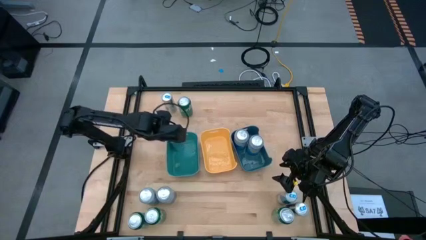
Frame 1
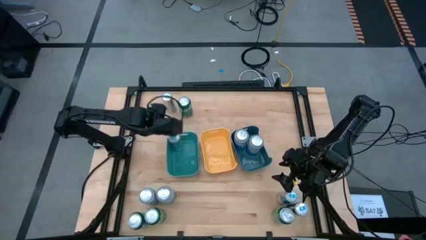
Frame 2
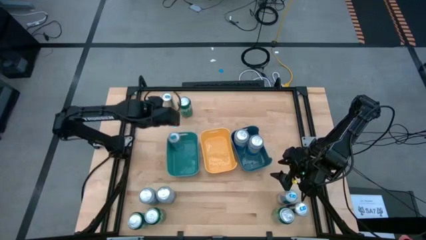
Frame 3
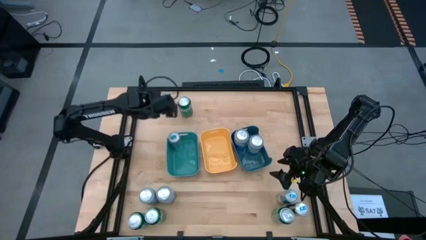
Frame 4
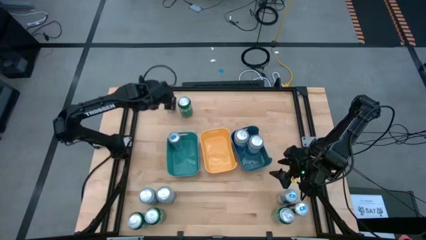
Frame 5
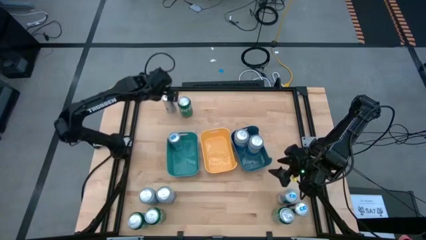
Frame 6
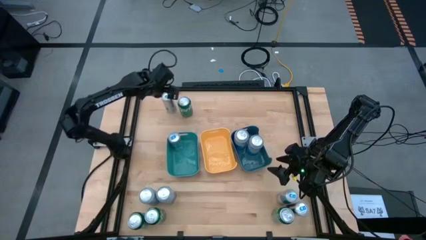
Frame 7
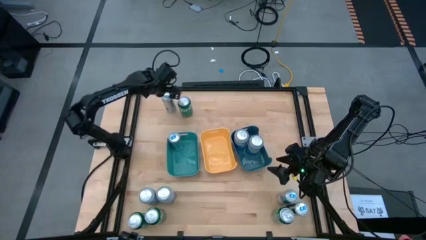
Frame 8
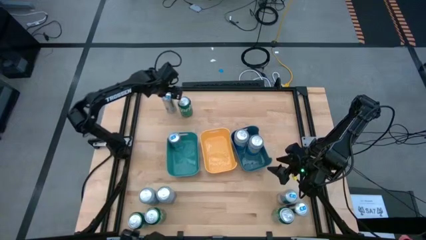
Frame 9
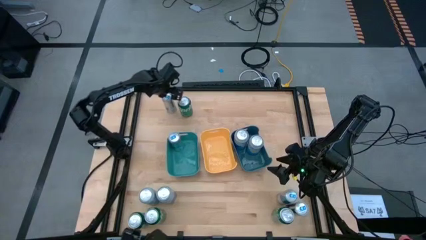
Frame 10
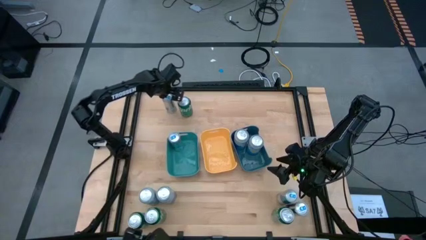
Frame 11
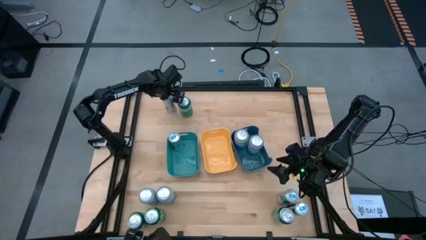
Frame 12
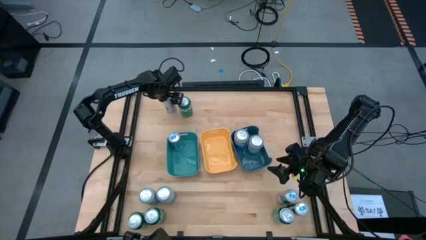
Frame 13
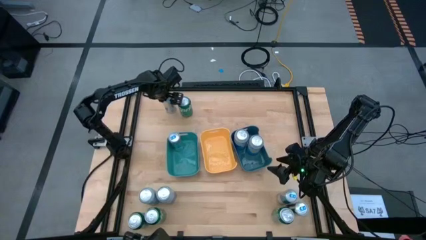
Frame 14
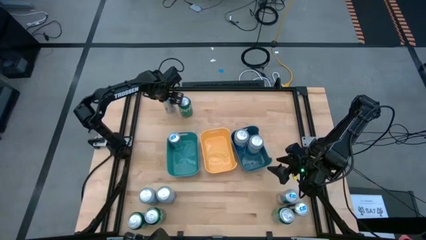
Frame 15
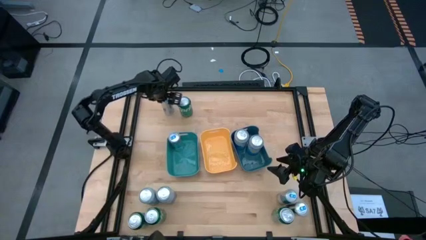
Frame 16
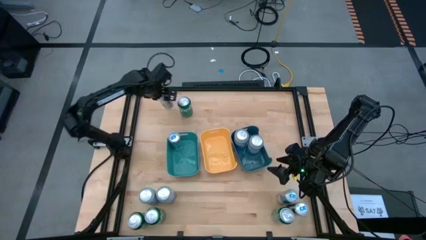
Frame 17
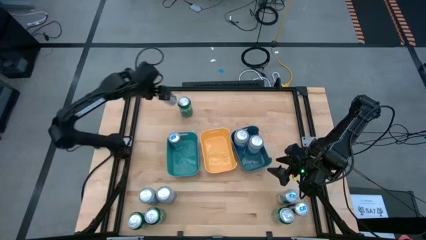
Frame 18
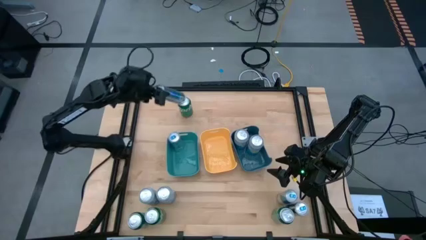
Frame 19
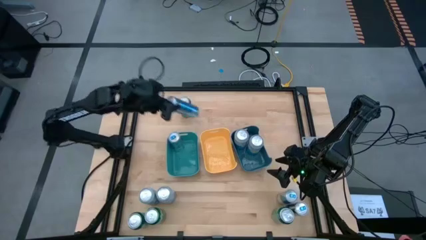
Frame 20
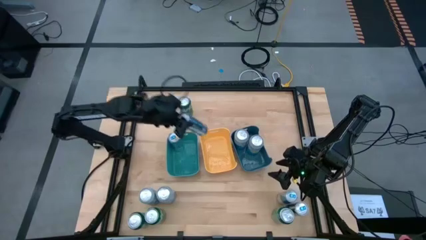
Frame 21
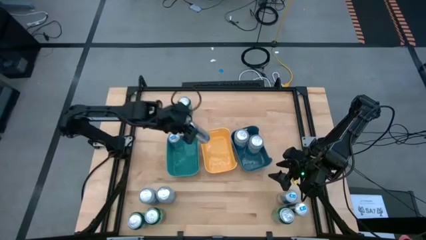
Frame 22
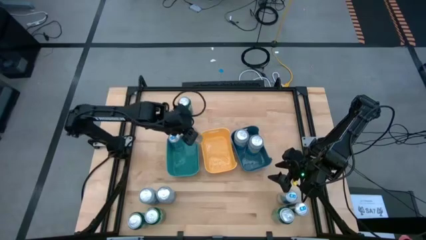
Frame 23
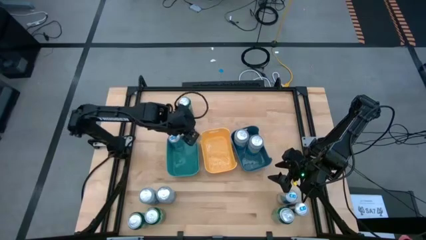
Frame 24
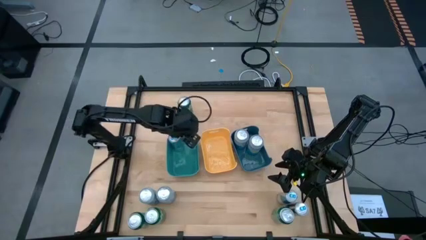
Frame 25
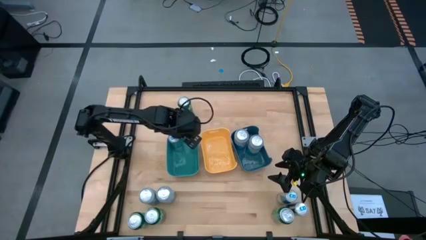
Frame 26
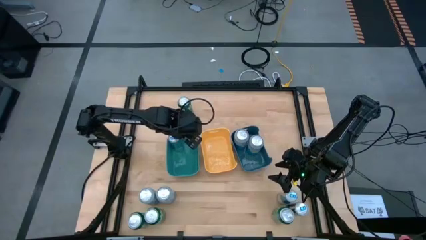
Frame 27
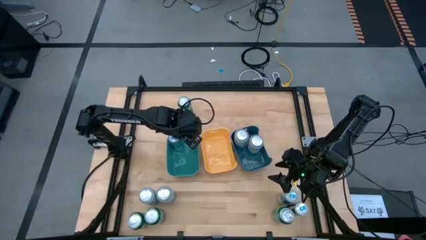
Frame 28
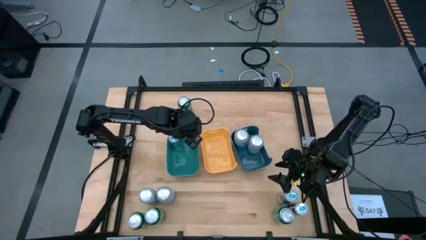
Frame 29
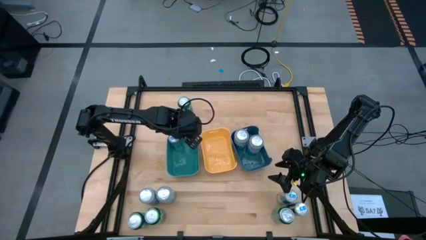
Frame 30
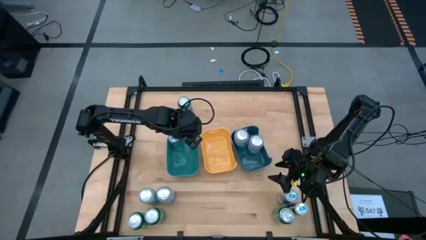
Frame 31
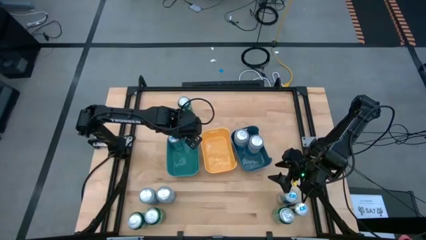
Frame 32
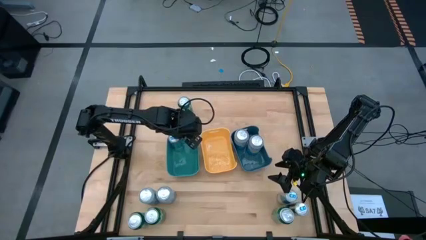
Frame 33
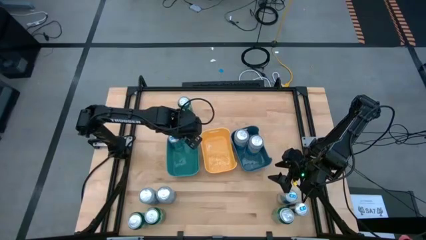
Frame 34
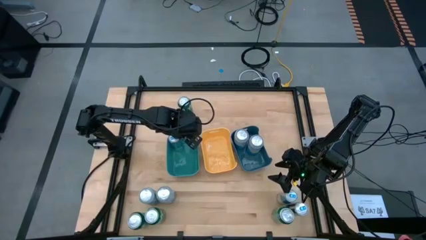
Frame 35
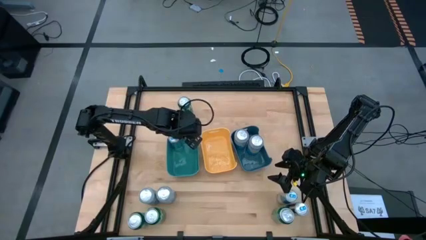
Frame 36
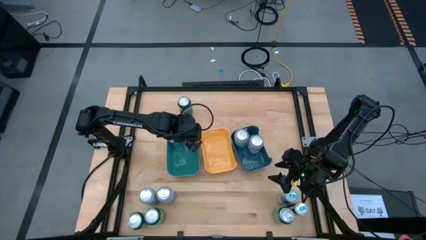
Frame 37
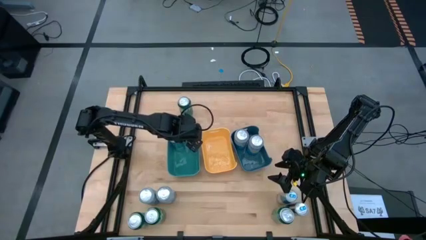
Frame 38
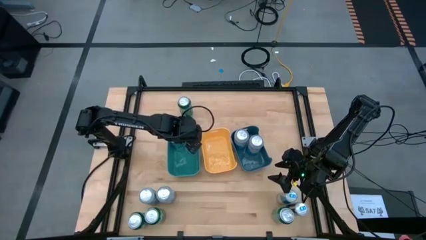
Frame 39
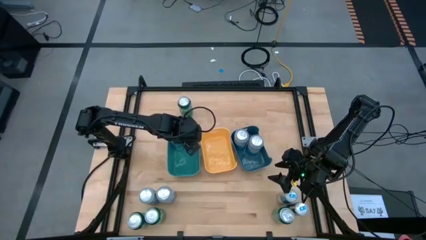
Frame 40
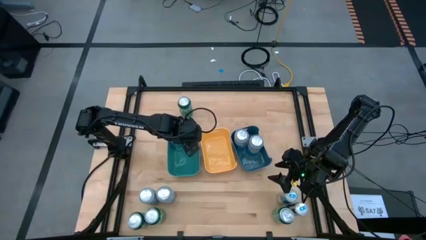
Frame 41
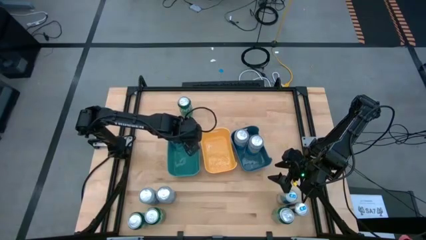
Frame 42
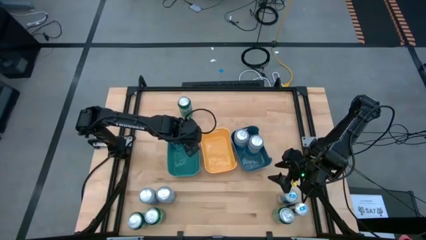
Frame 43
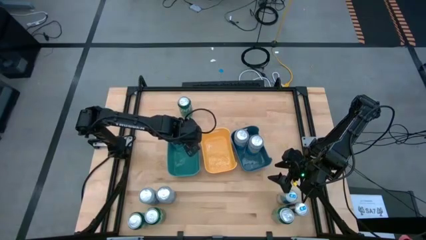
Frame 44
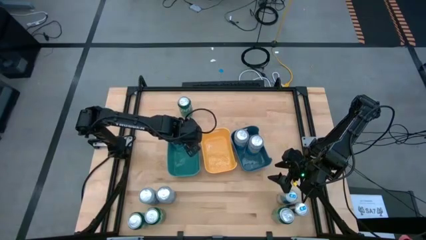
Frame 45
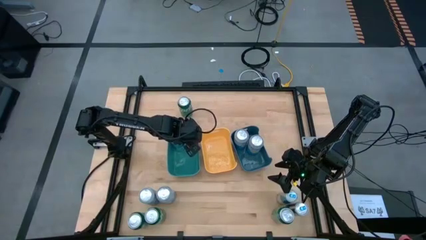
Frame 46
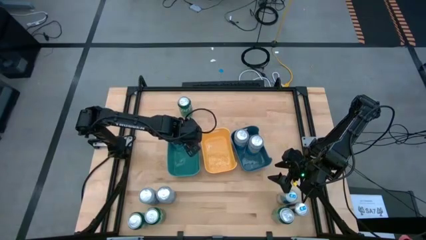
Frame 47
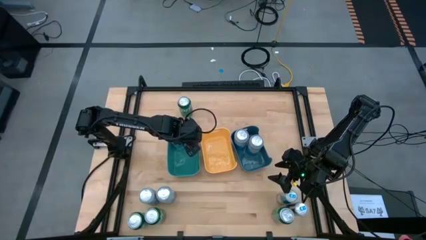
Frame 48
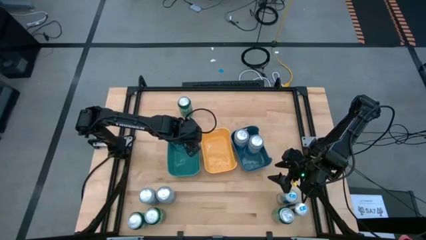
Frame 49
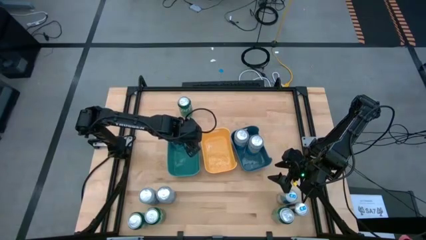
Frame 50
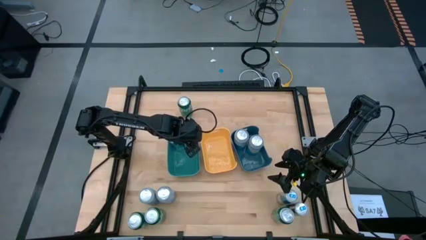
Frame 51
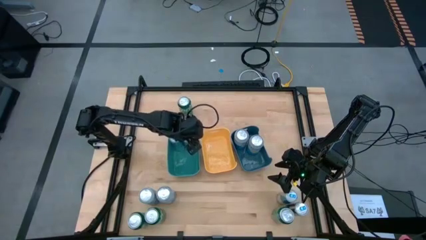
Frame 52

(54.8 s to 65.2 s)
Task: Sort soda cans
Put the white and blue soda can into the light blue bin

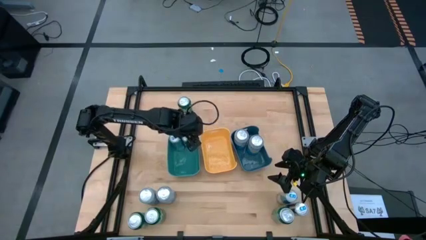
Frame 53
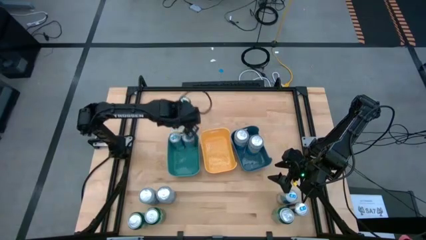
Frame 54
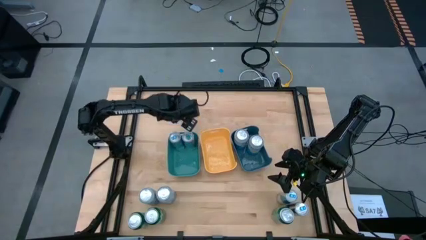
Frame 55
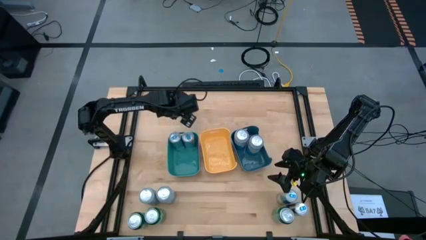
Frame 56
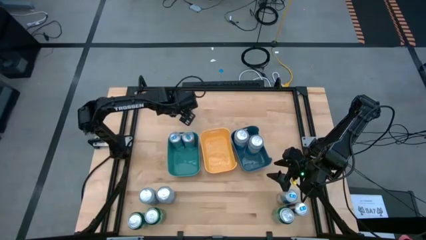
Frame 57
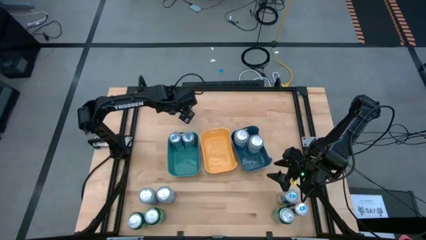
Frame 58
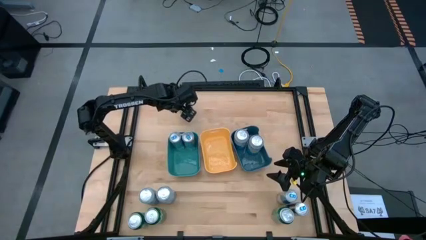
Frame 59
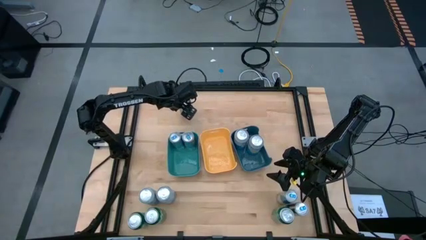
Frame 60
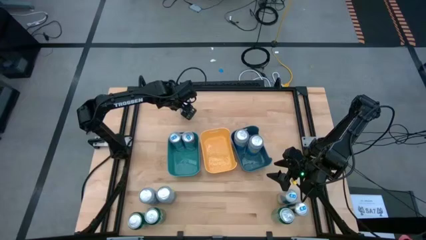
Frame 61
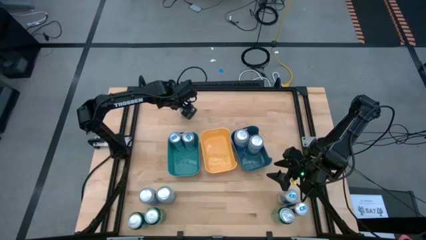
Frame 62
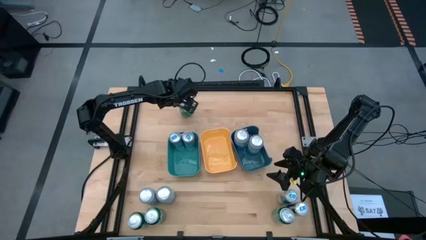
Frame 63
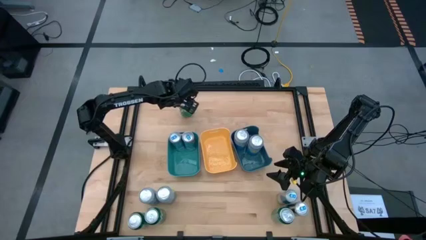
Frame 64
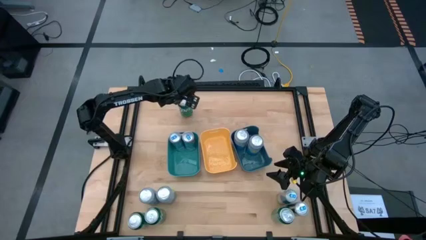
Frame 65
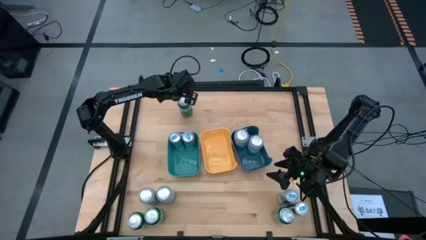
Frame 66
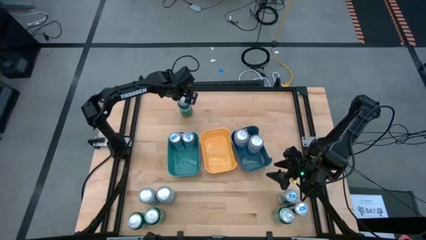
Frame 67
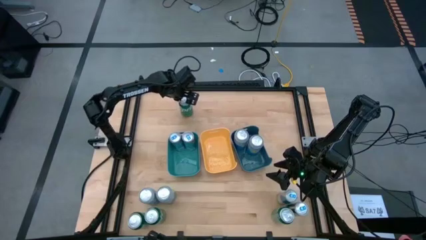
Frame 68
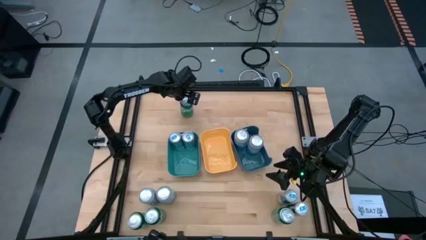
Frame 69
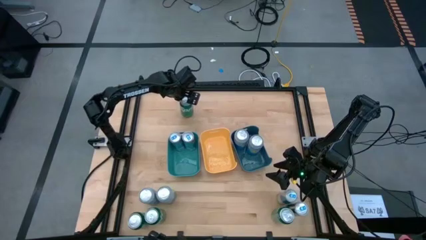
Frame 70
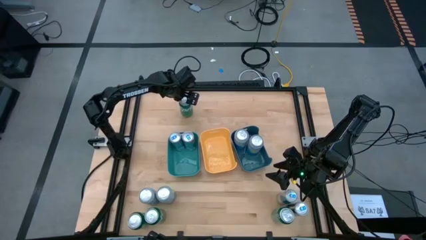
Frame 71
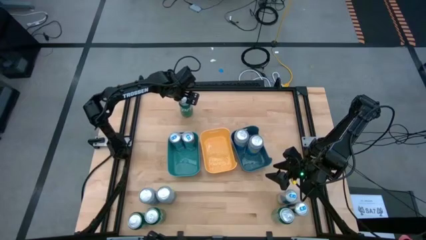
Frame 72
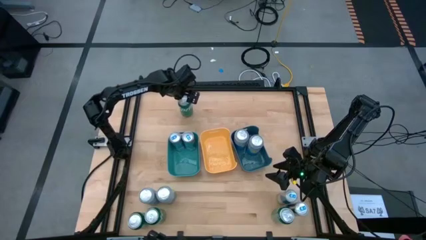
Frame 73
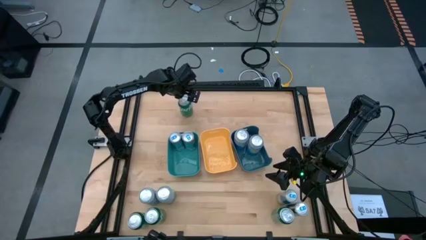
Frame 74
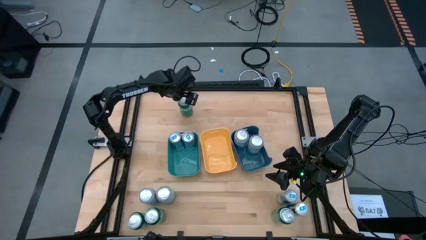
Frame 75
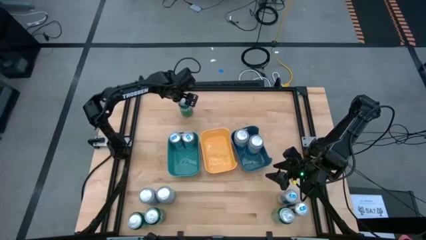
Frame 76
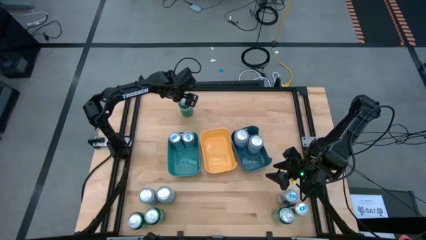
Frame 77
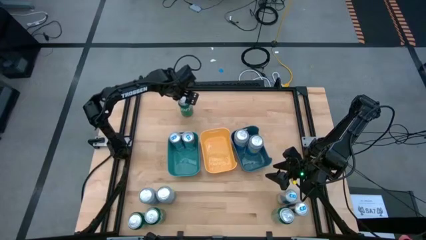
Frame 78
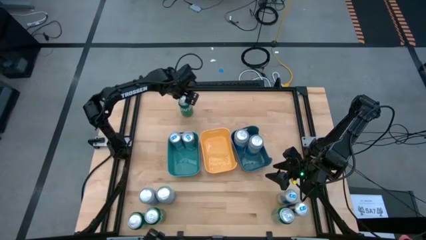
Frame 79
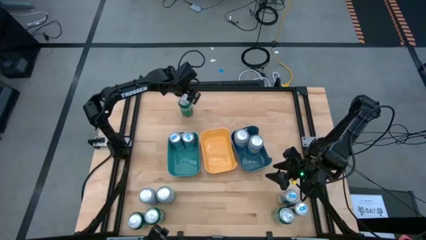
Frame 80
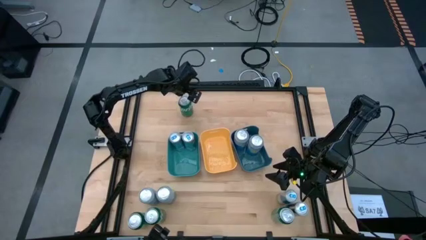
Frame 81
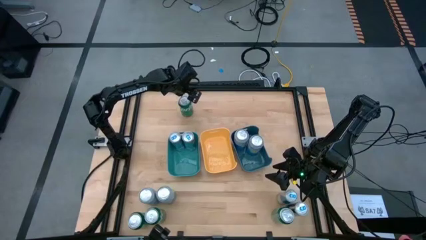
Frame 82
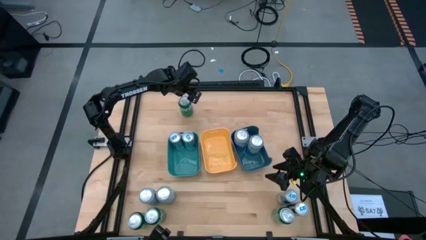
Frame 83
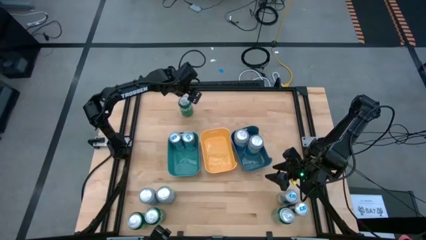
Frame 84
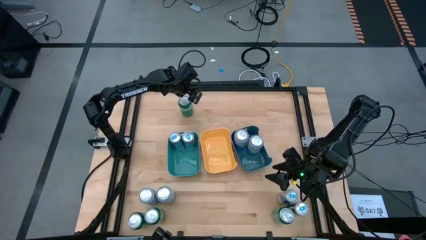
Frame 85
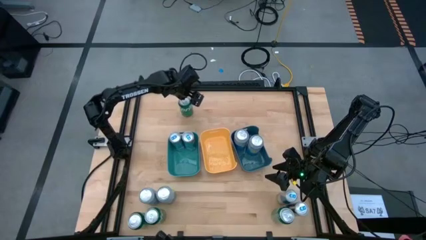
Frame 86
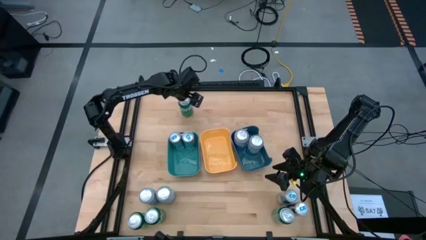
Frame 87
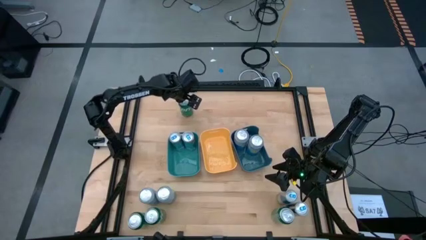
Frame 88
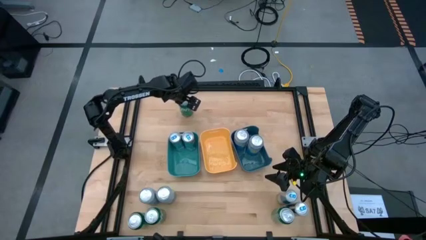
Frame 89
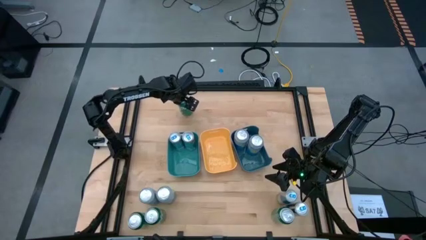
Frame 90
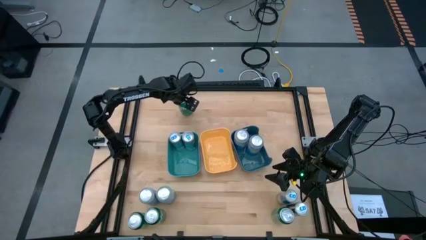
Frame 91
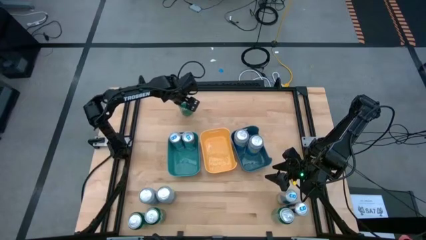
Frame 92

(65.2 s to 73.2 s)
Put the green soda can into the yellow bin
